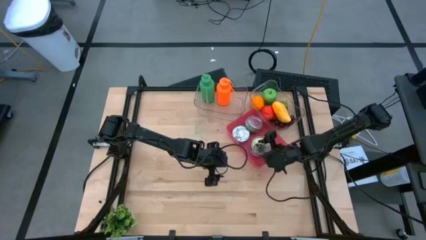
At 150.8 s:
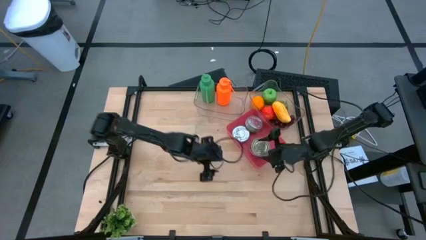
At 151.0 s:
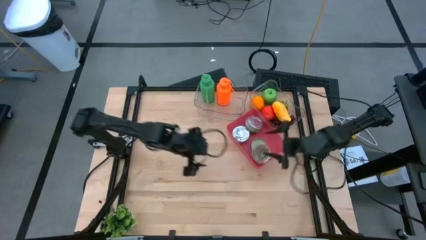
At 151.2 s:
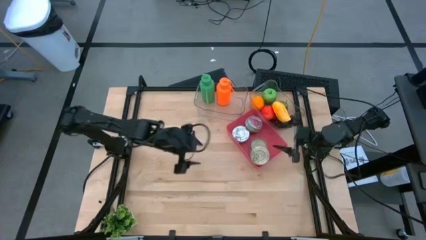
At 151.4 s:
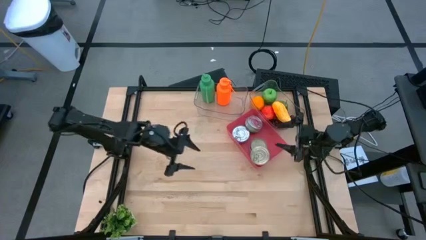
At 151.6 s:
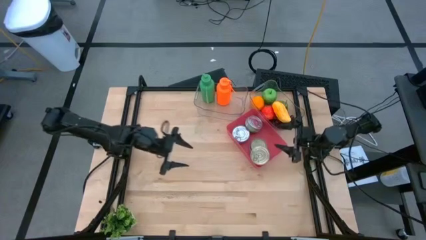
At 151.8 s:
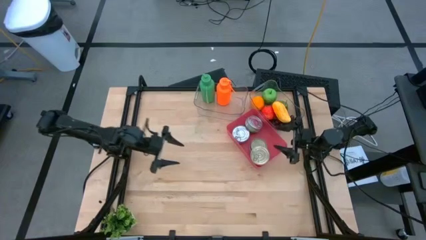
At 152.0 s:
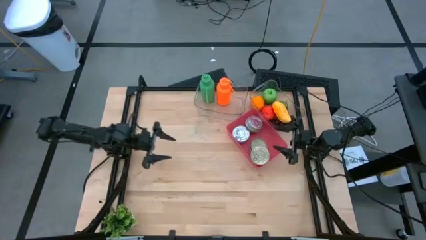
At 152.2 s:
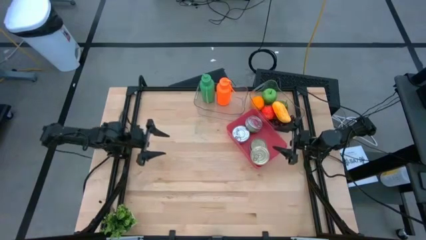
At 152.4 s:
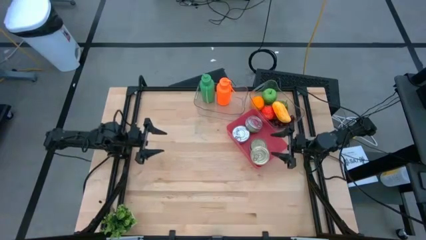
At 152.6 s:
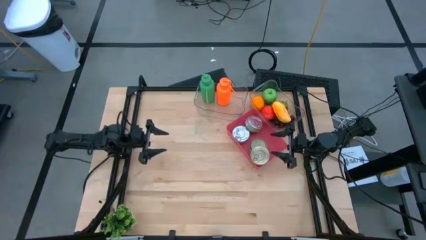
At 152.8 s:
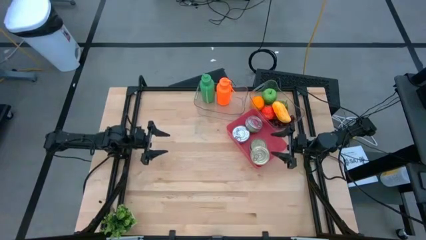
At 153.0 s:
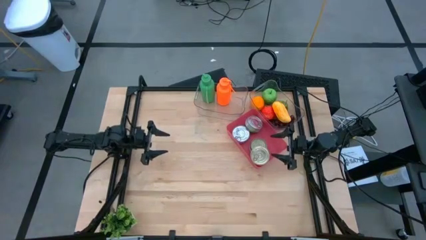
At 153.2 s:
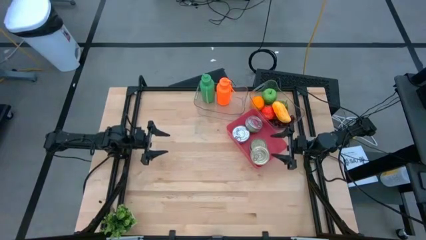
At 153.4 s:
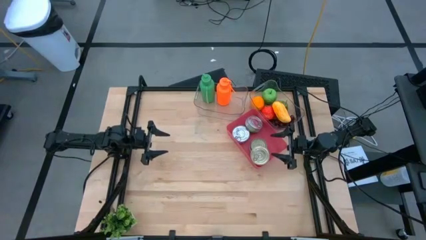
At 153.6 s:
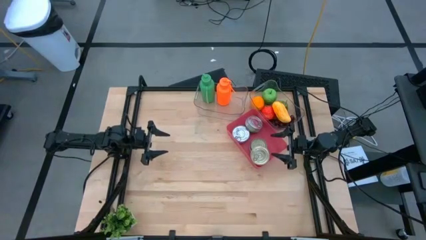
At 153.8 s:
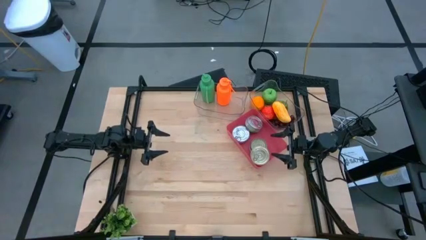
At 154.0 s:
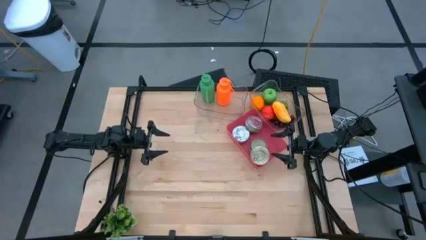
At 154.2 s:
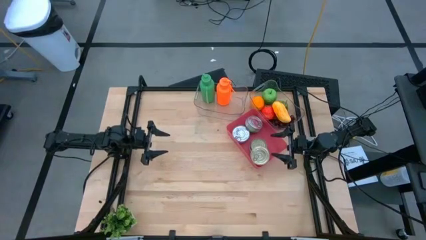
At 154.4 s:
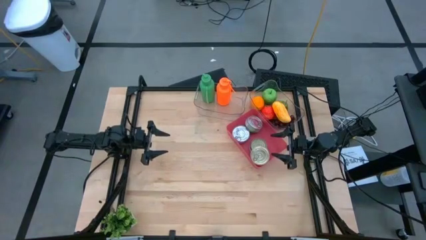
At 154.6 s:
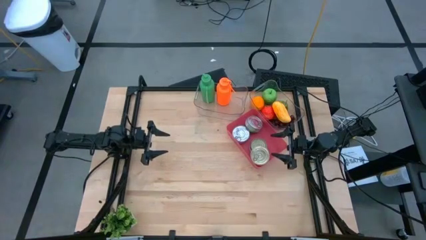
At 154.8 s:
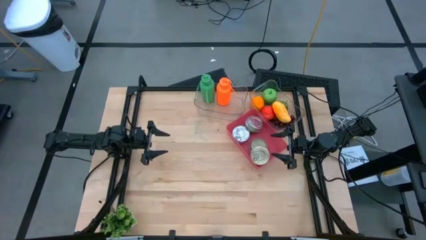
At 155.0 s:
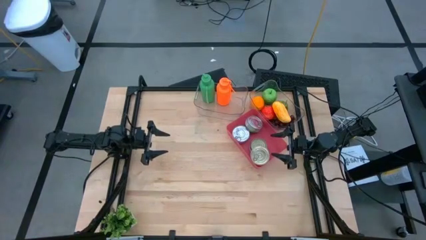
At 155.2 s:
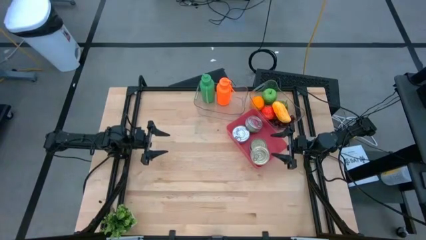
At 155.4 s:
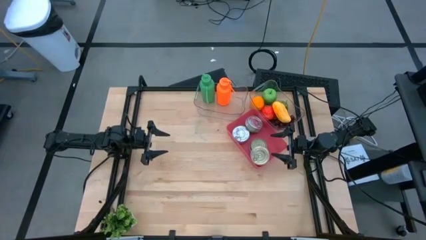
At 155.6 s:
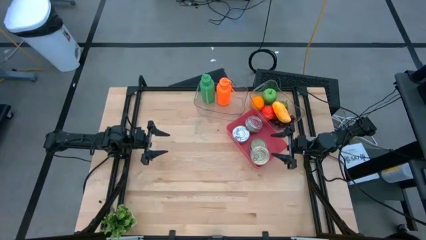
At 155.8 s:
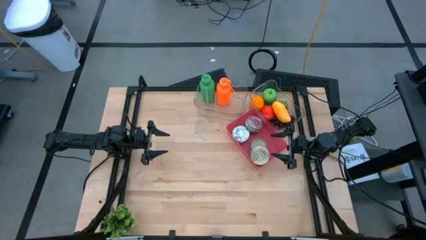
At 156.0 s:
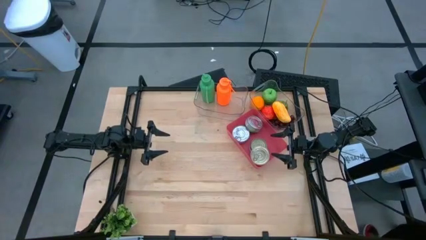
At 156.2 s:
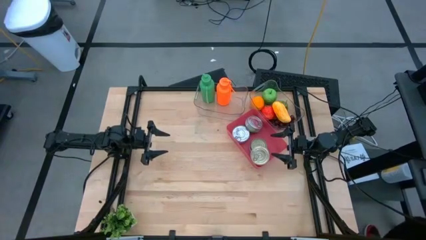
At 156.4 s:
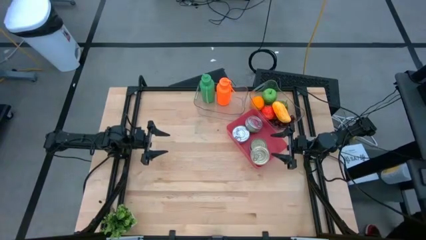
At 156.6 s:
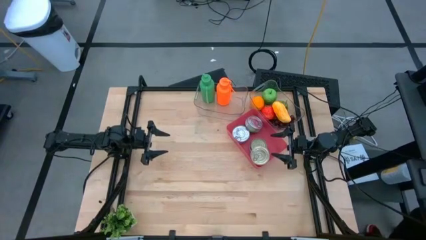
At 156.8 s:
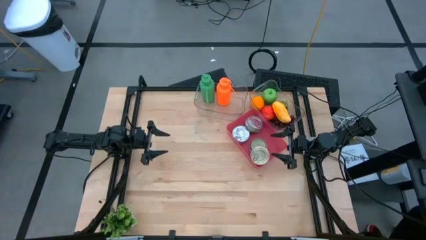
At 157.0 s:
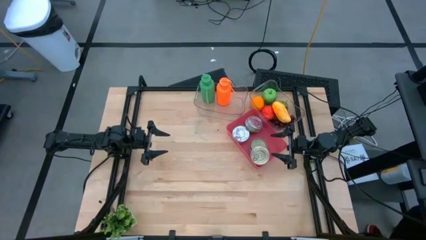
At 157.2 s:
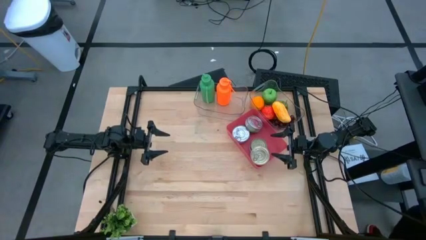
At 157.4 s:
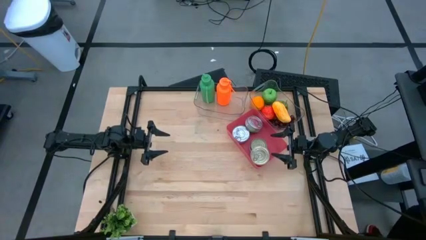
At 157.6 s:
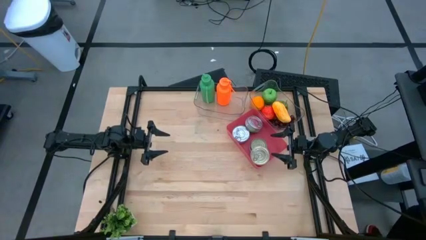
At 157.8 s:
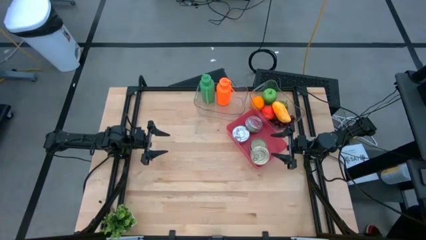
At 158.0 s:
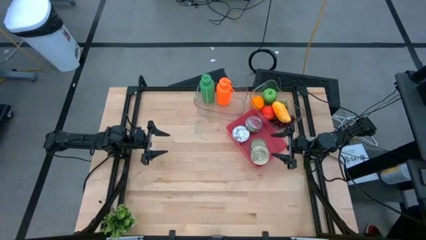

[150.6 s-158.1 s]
Task: Pick & Place Food Item
Return to Home Position

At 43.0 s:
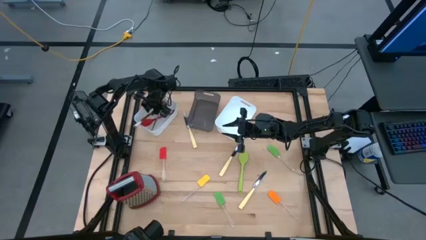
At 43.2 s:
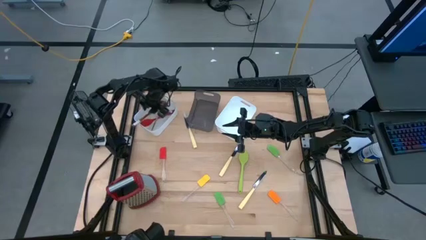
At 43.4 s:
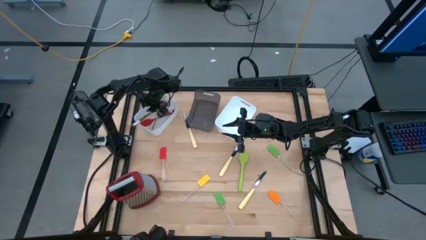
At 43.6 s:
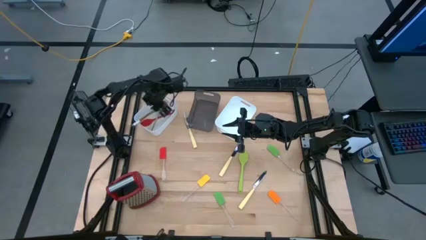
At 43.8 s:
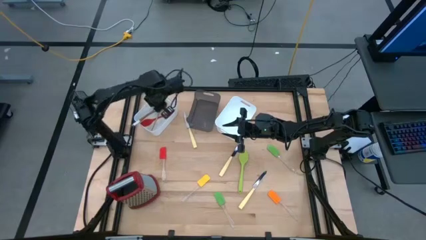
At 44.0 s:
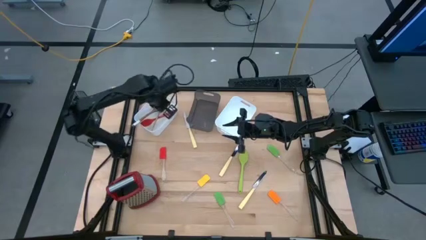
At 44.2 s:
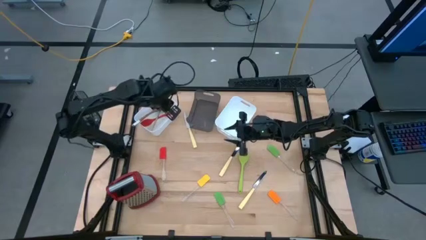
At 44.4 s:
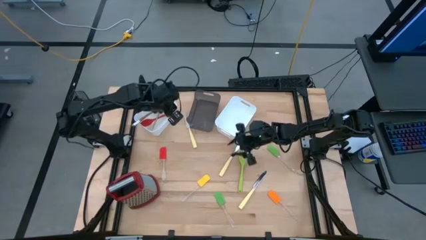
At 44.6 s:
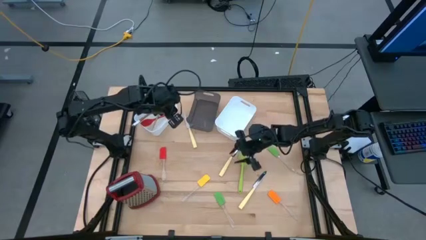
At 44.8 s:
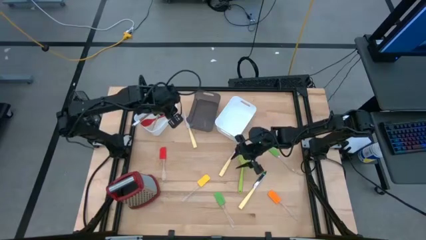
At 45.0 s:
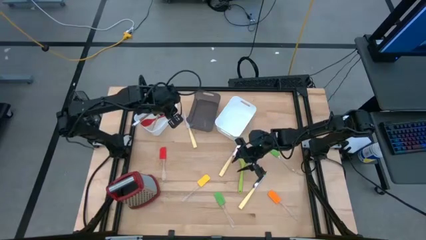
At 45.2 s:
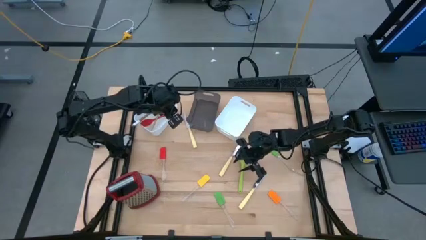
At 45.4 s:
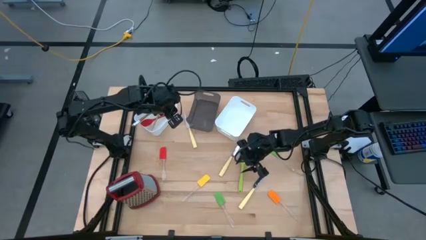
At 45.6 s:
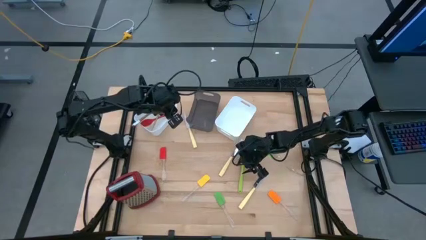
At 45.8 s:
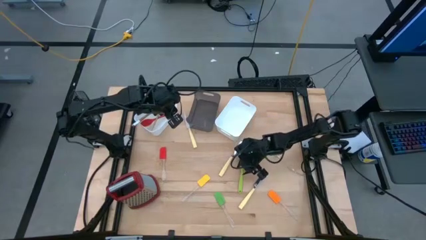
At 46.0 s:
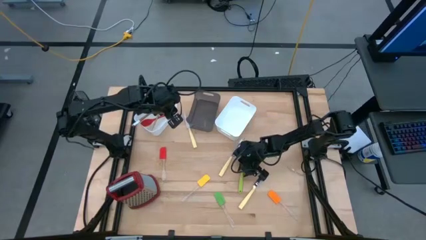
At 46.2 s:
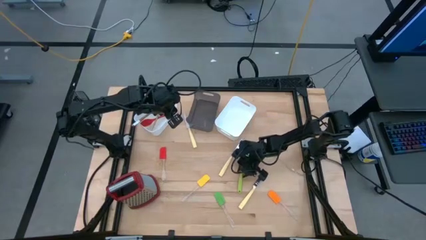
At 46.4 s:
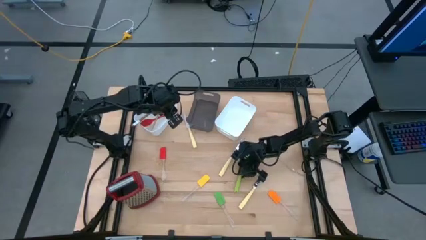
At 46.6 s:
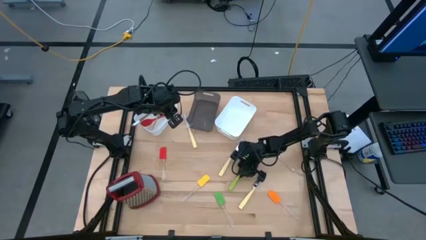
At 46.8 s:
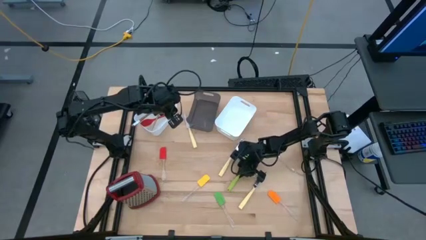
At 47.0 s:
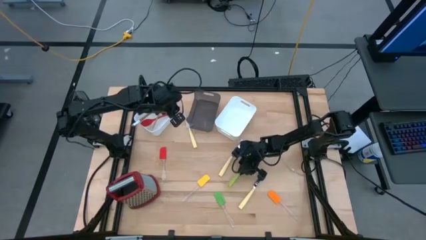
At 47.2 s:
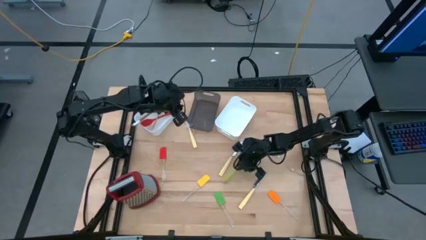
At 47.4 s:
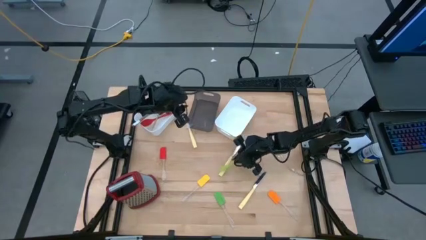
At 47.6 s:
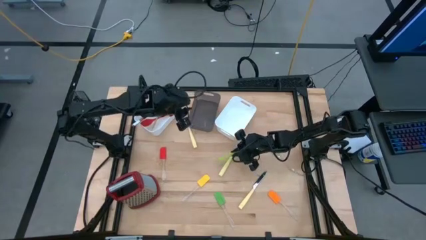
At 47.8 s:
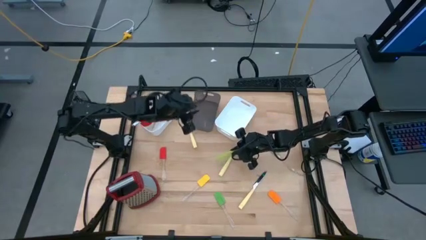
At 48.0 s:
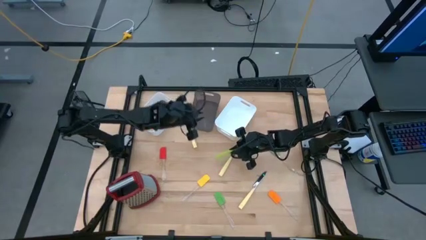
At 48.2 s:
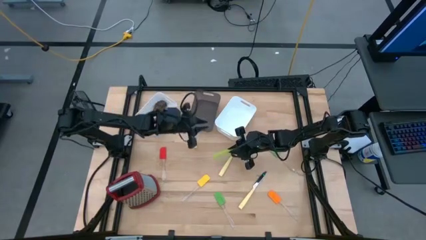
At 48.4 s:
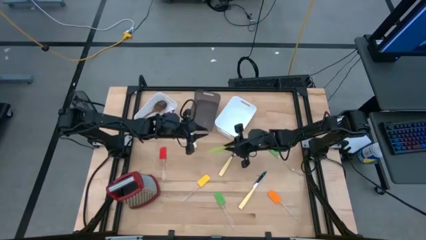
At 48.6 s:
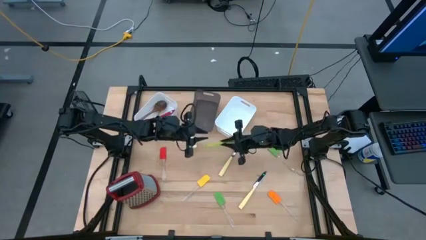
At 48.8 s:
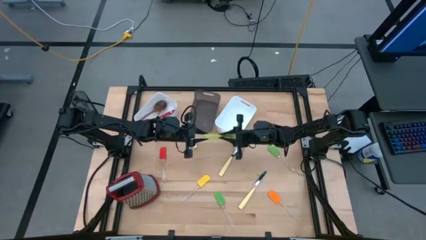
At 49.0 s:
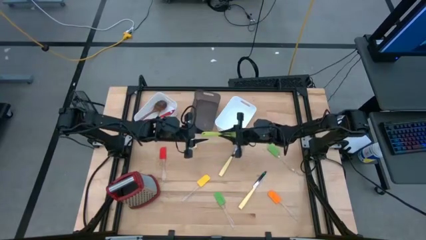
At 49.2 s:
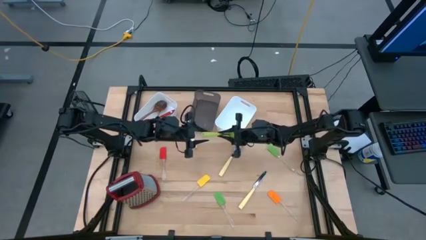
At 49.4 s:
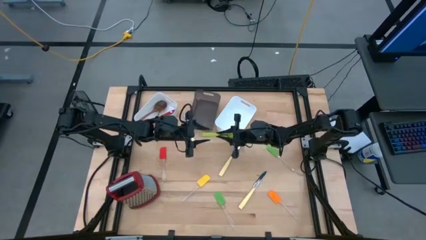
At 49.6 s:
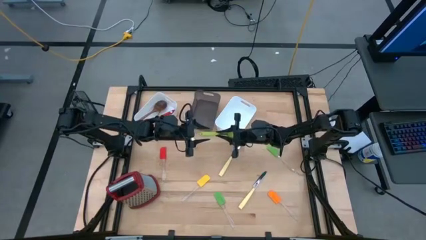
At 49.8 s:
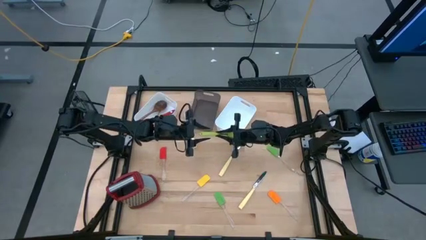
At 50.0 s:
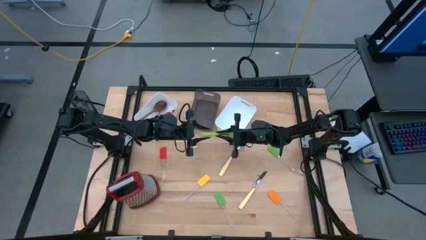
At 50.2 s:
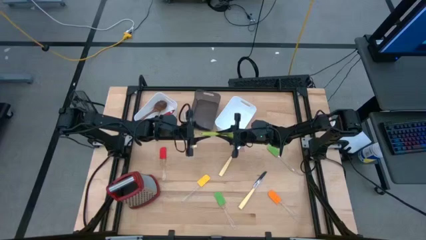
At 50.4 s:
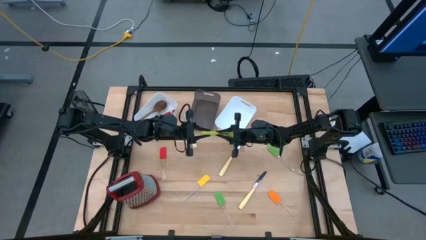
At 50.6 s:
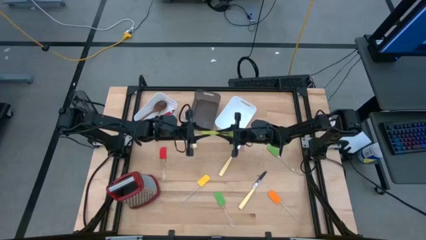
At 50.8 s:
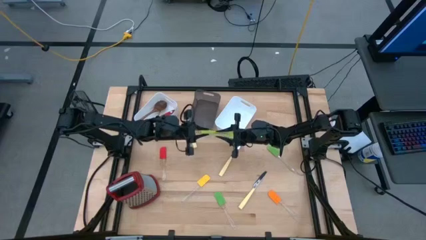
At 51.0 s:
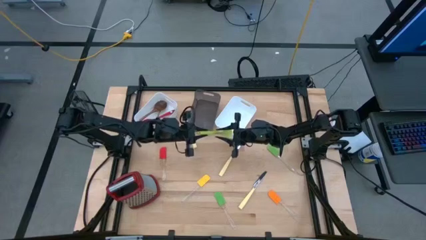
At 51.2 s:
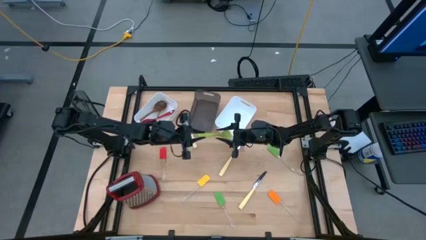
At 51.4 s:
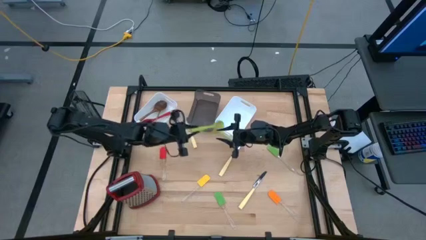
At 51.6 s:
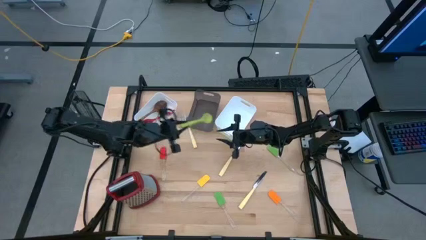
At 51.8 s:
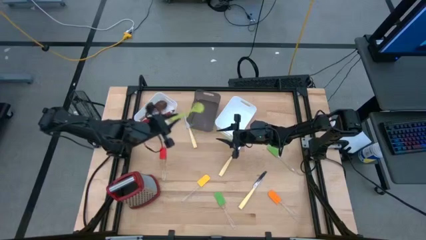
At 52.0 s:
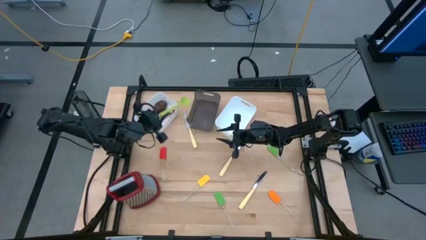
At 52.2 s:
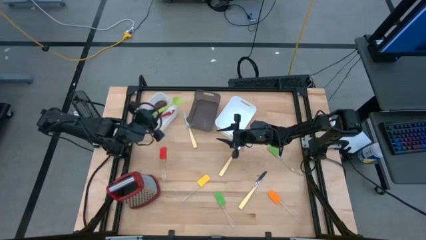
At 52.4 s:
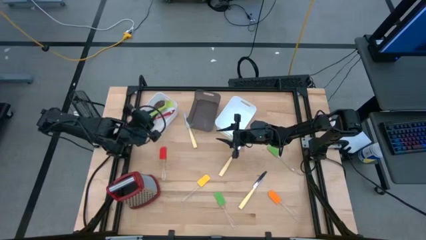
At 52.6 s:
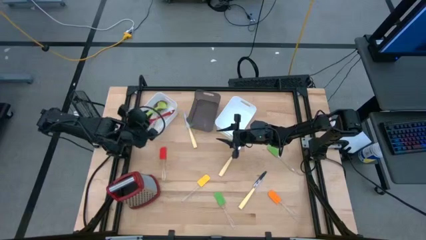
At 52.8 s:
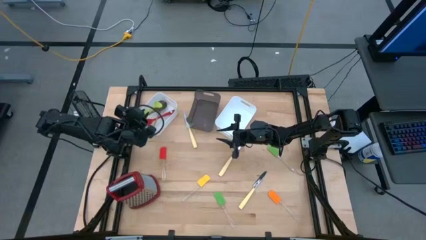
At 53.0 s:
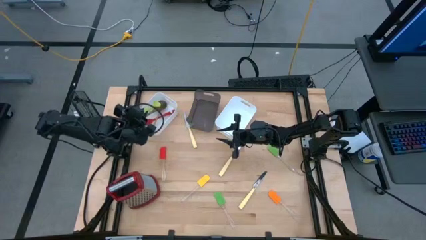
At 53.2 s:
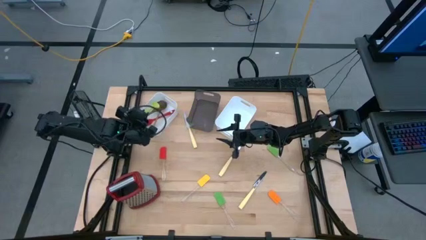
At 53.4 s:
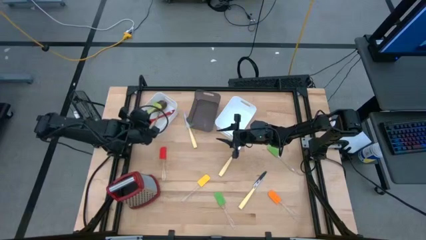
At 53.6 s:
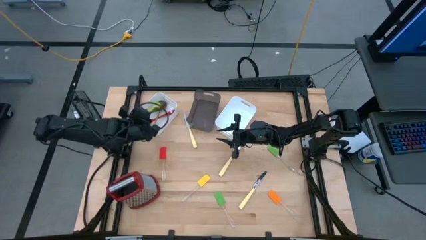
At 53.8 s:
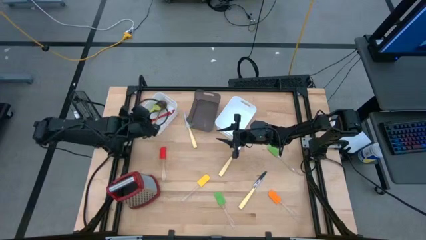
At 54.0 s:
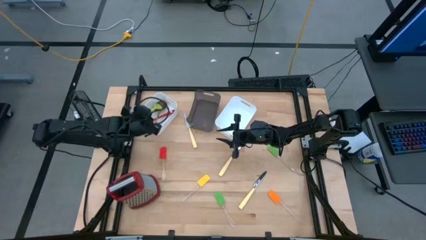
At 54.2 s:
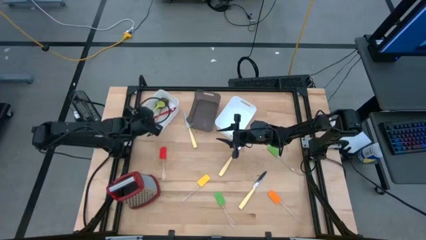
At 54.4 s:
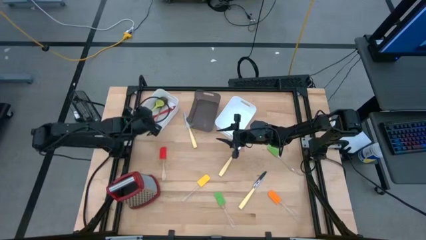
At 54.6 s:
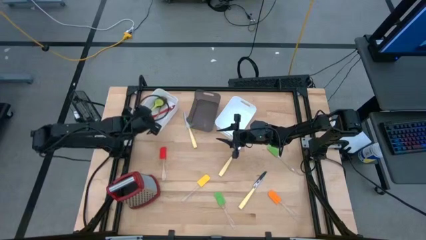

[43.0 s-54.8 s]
Task: Pick & Place Kitchen Items
Put the green serving spoon into the left white bin
